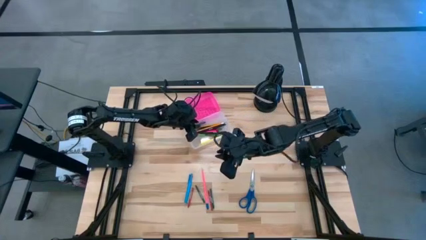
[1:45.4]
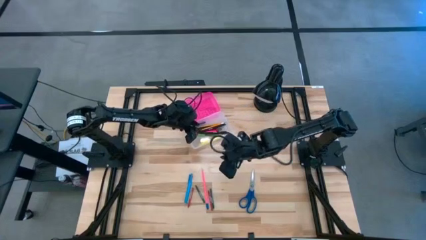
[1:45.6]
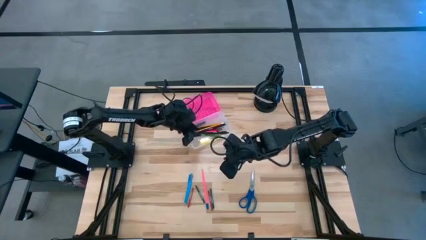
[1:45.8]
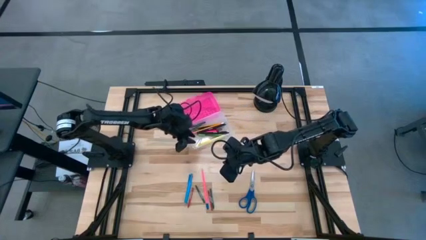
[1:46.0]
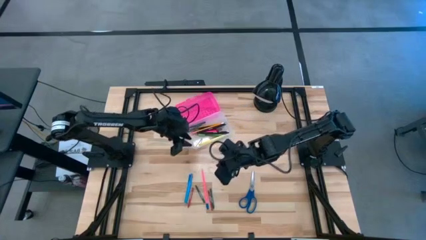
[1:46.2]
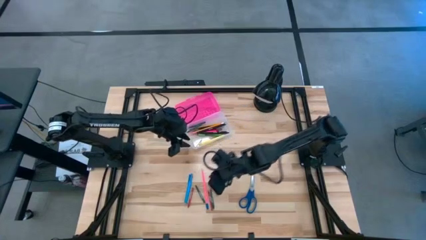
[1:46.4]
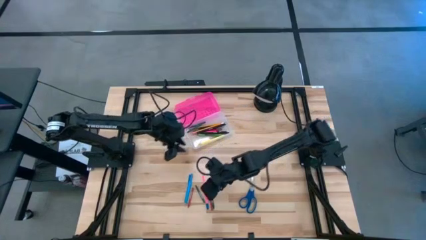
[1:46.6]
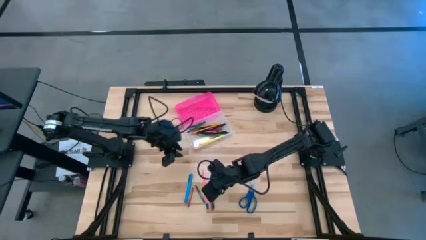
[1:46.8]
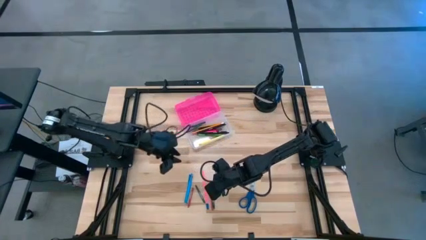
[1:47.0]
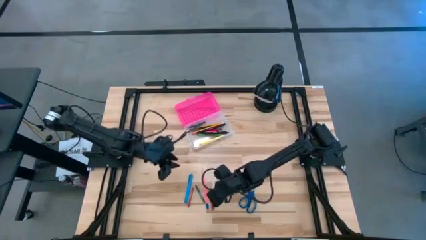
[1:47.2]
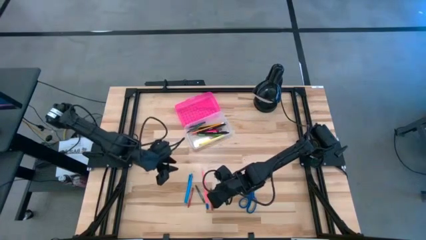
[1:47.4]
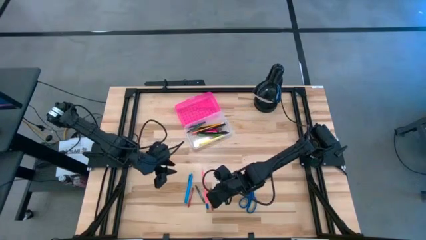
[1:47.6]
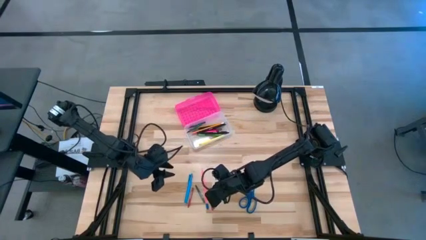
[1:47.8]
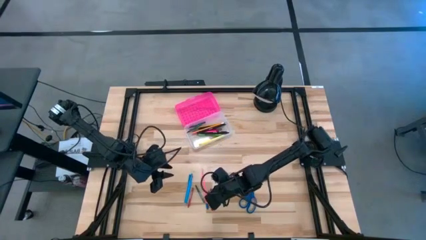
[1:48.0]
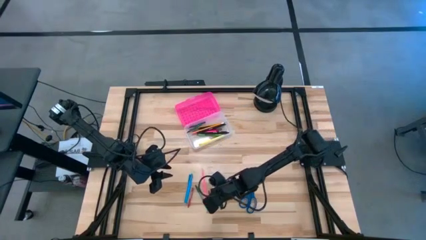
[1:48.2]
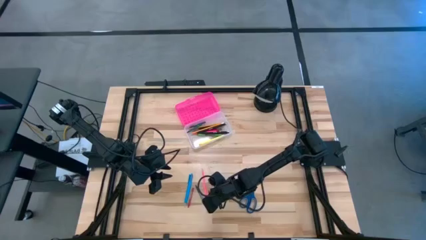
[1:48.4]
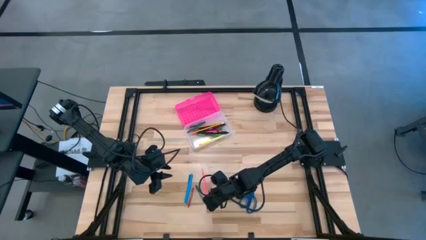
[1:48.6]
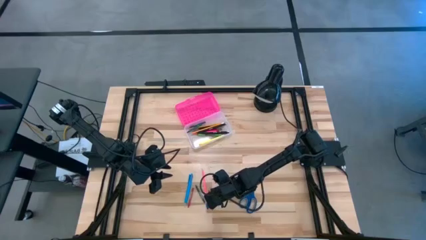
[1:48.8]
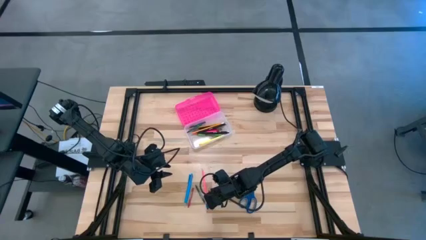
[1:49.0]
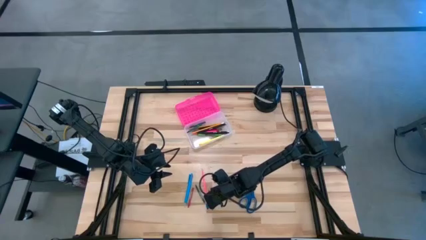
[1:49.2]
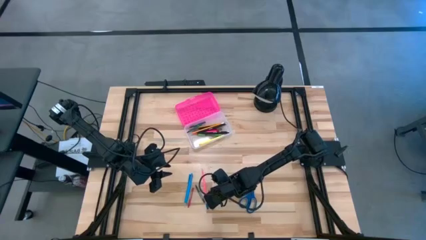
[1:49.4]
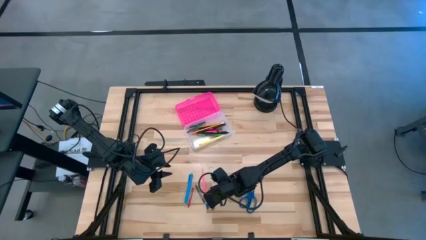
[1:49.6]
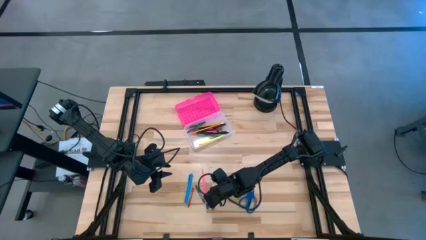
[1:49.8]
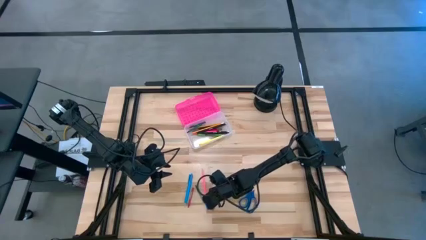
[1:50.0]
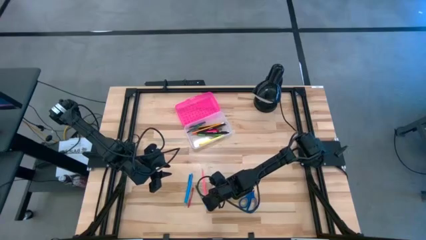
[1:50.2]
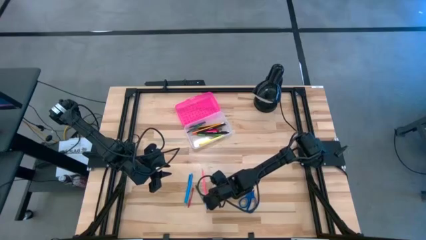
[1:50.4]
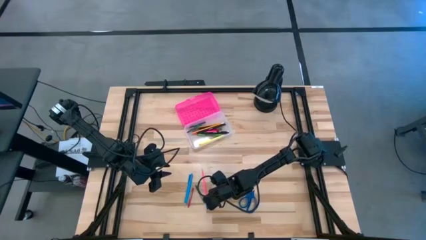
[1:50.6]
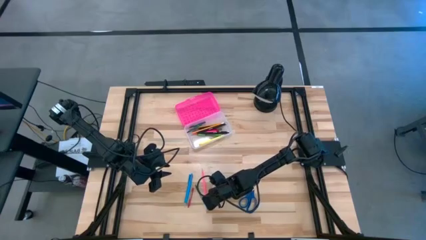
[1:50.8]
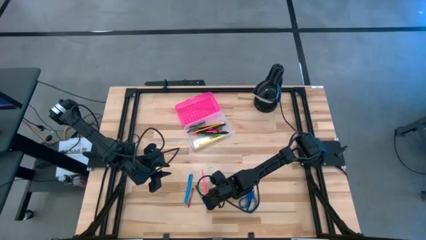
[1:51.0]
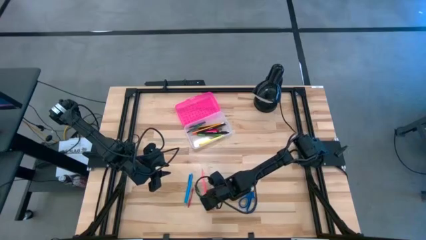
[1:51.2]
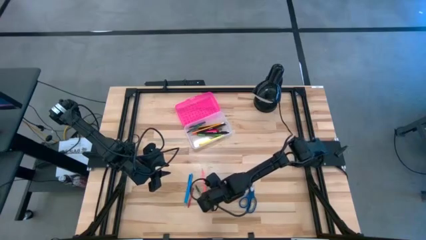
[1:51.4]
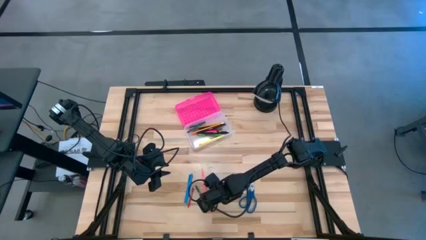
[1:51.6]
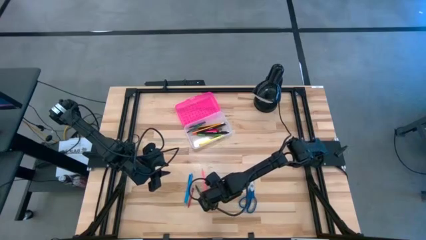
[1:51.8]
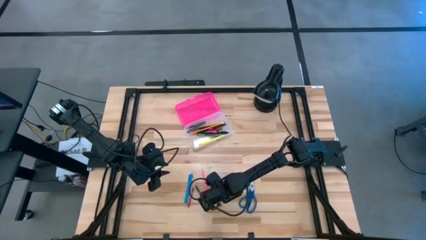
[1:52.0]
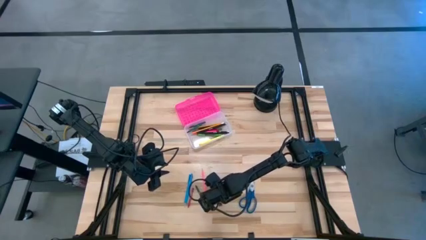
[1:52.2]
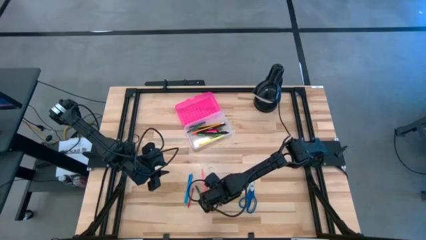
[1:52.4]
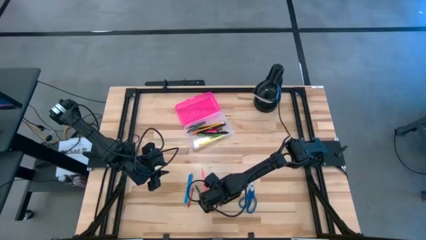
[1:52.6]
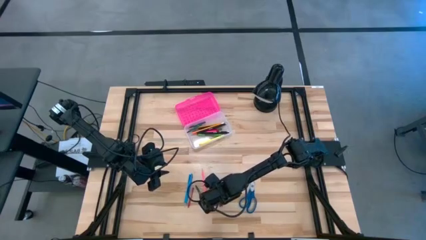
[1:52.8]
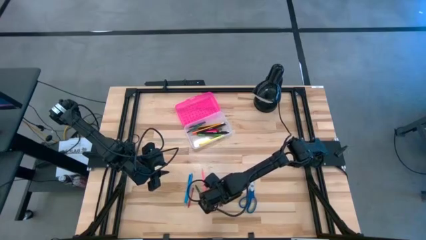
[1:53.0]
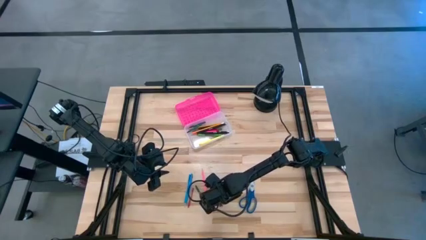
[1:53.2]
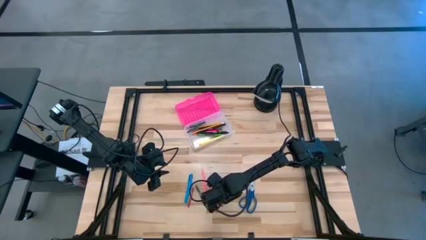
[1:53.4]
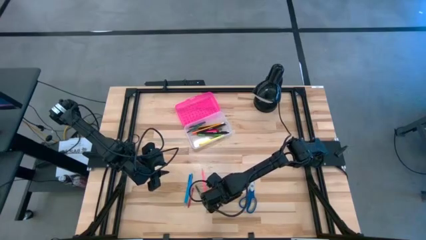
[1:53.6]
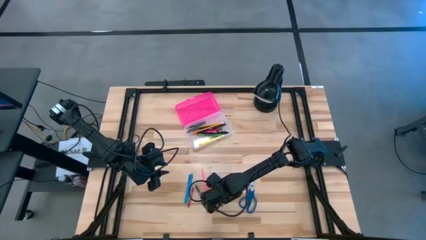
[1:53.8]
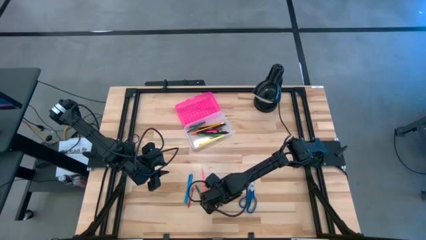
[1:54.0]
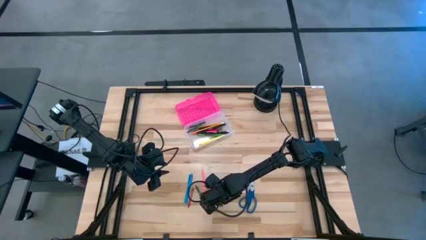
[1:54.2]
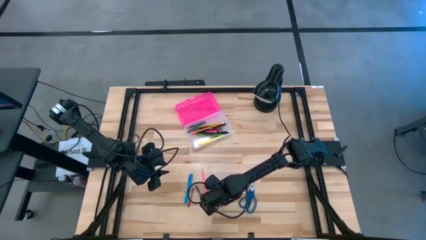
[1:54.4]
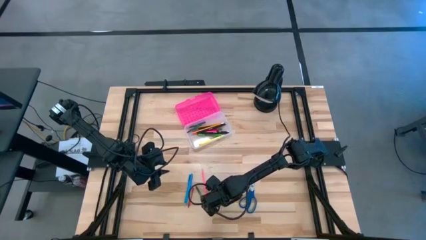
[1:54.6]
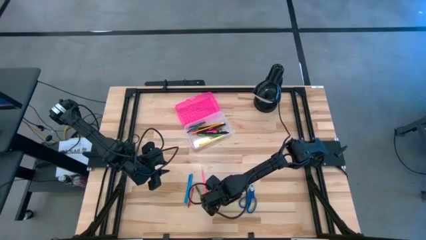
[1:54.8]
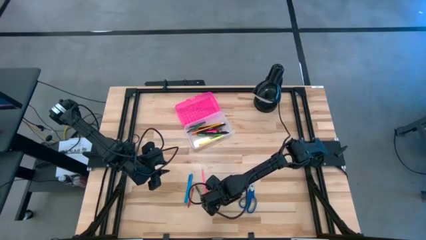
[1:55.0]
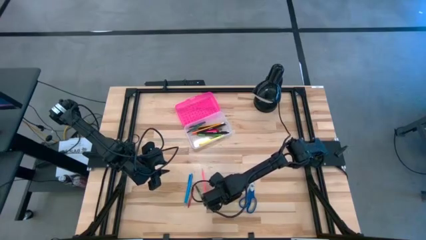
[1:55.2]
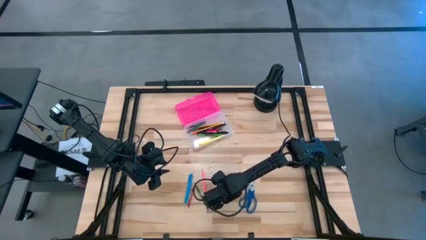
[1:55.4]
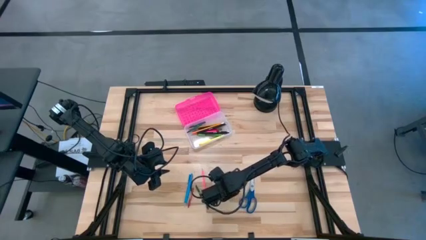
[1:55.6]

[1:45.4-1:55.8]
Task: Pick & place school supplies into a supply box
Put the green crayon into the pink supply box

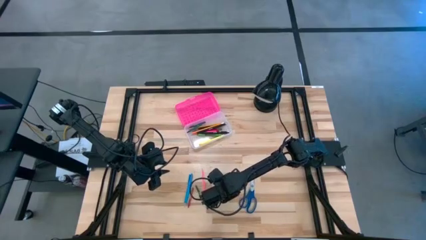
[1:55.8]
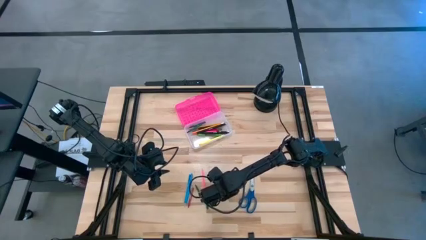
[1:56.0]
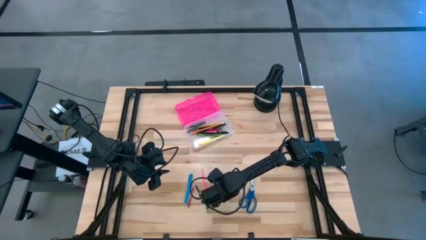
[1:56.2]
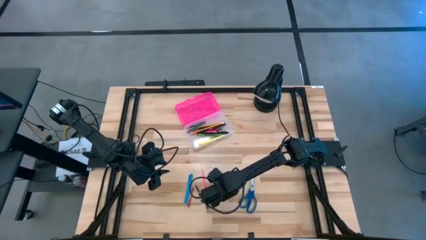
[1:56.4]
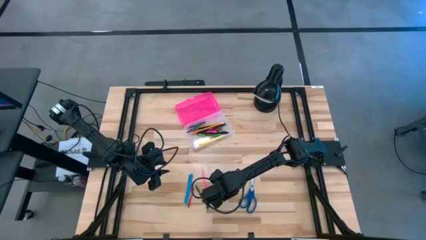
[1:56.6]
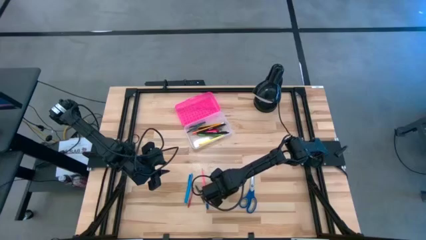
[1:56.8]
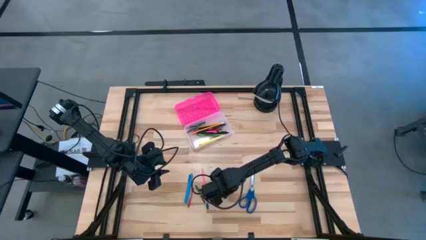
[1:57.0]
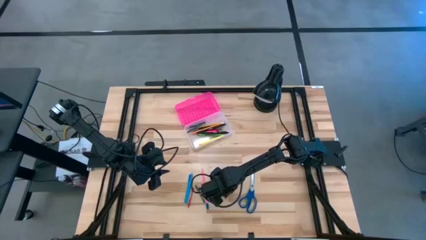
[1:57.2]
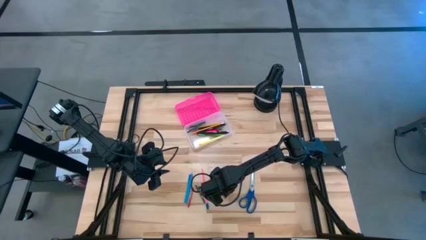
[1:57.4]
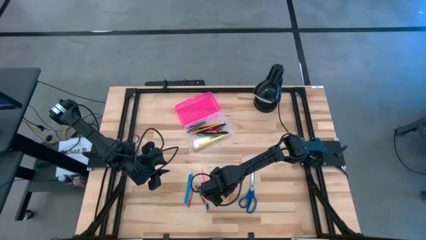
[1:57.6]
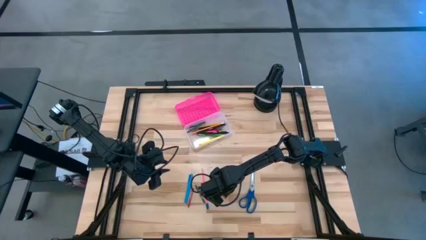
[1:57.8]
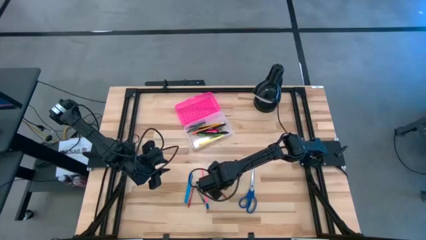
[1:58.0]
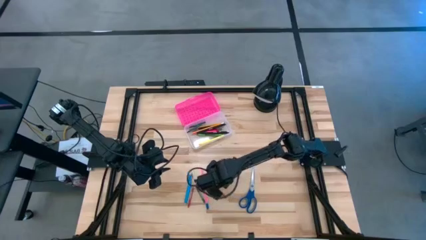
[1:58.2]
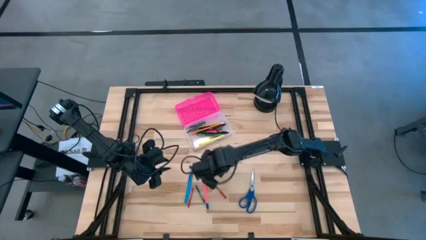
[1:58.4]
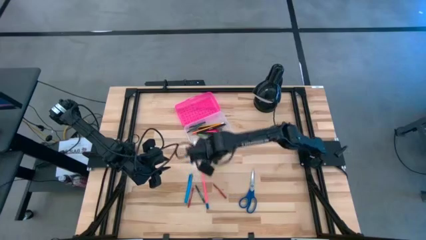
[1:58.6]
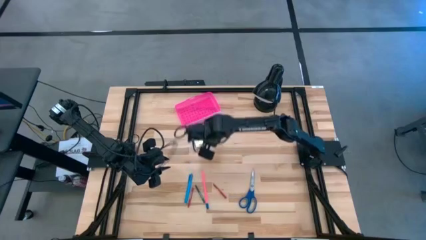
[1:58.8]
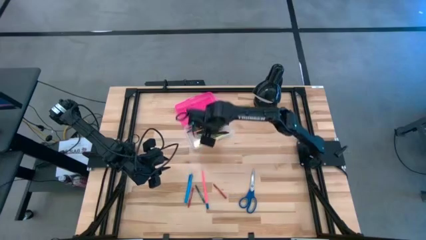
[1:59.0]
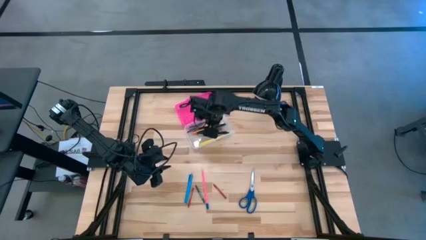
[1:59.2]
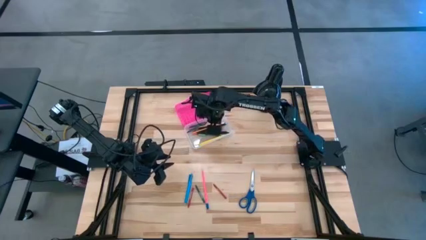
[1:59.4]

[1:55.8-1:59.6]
Put the green crayon into the pink supply box
